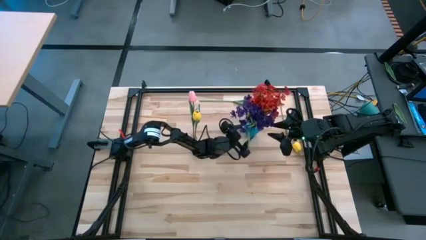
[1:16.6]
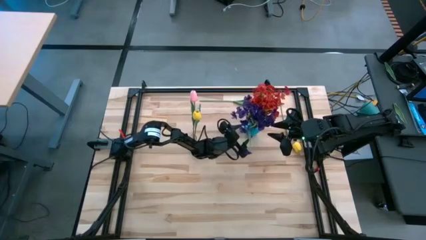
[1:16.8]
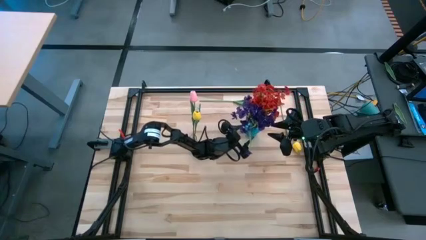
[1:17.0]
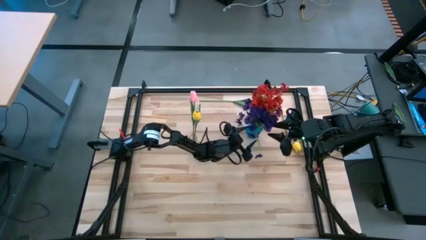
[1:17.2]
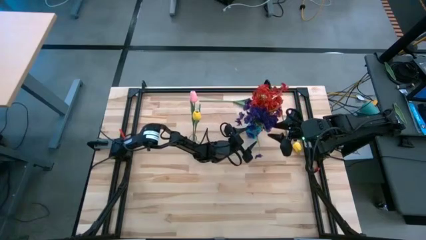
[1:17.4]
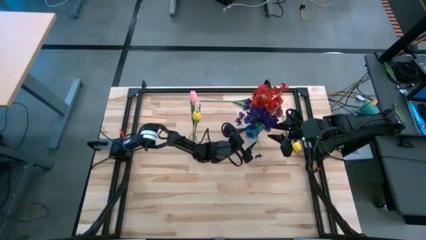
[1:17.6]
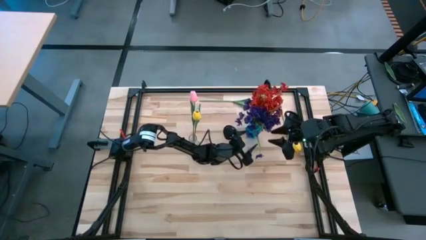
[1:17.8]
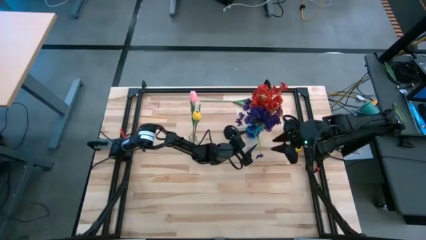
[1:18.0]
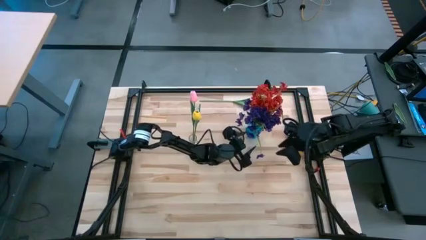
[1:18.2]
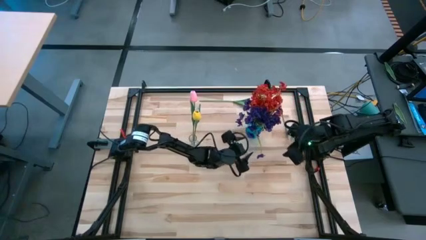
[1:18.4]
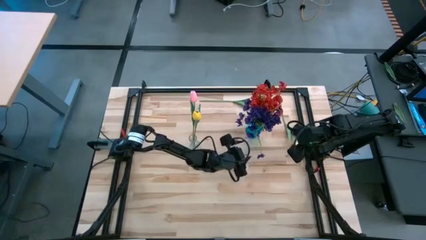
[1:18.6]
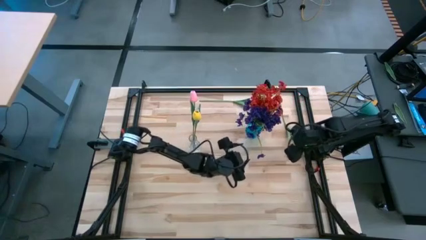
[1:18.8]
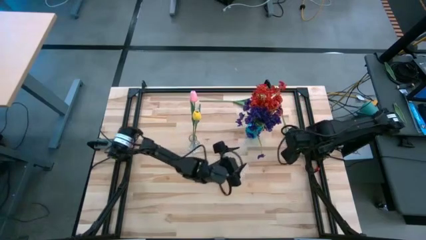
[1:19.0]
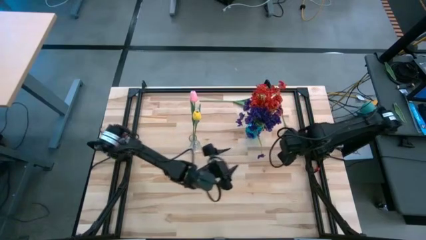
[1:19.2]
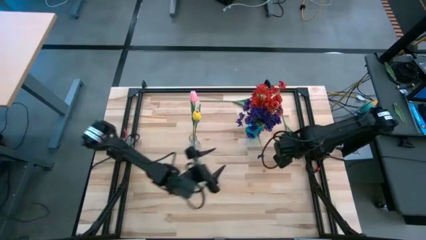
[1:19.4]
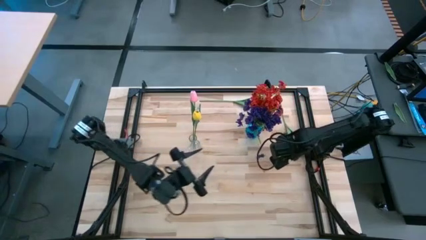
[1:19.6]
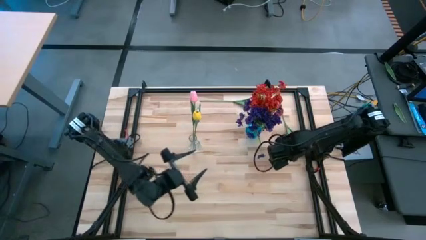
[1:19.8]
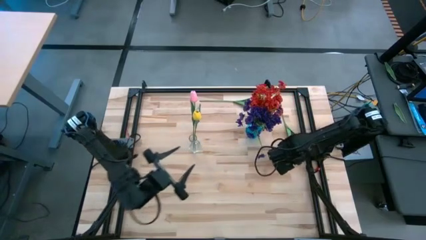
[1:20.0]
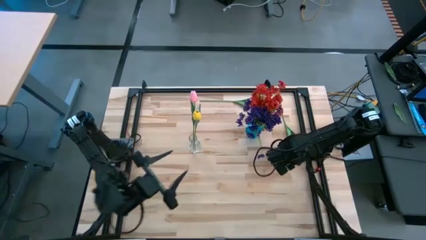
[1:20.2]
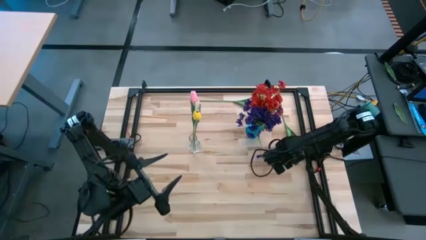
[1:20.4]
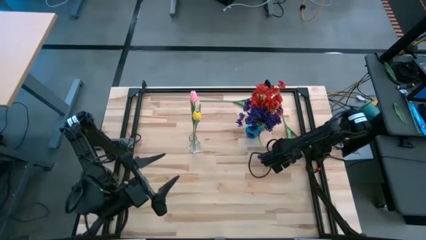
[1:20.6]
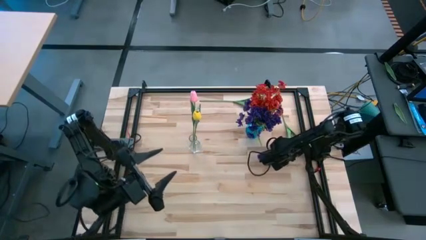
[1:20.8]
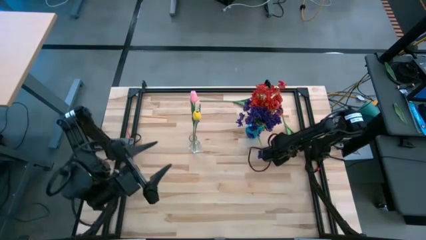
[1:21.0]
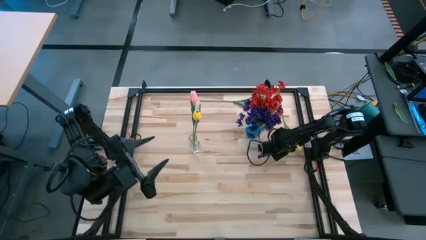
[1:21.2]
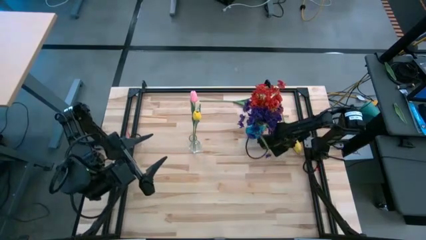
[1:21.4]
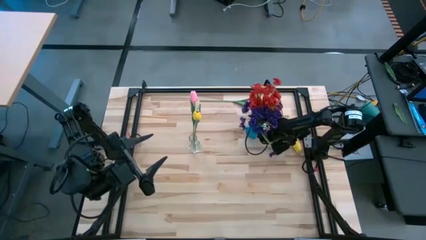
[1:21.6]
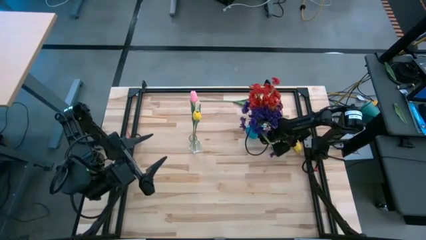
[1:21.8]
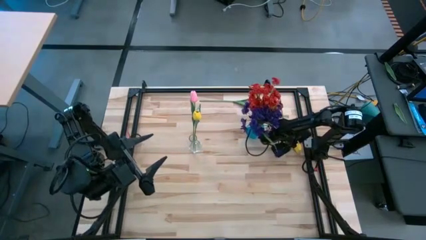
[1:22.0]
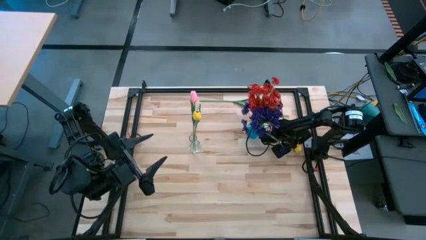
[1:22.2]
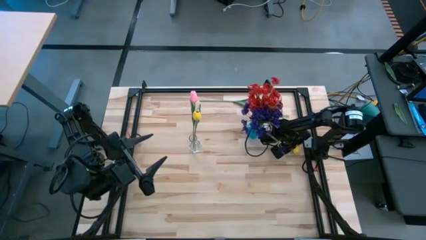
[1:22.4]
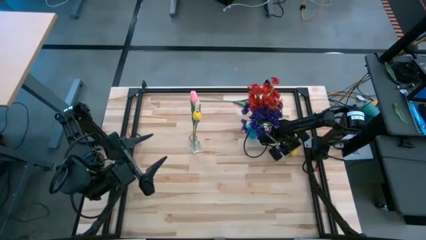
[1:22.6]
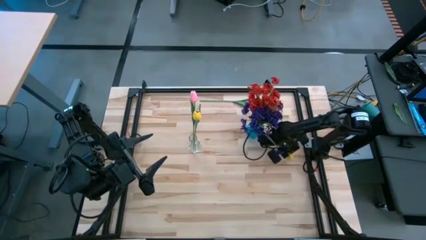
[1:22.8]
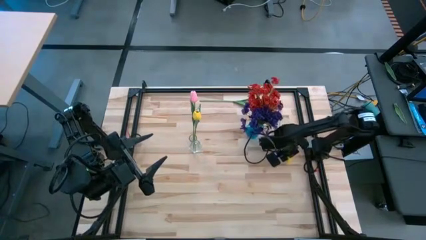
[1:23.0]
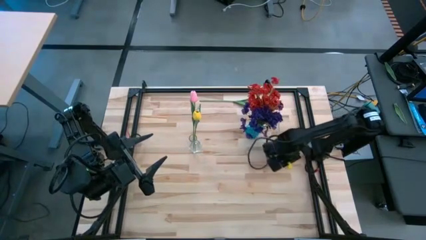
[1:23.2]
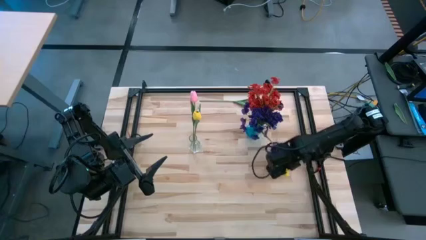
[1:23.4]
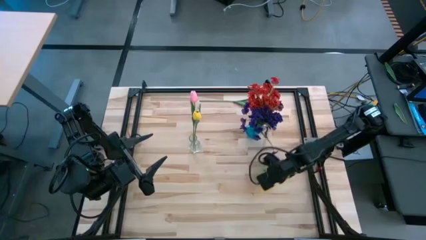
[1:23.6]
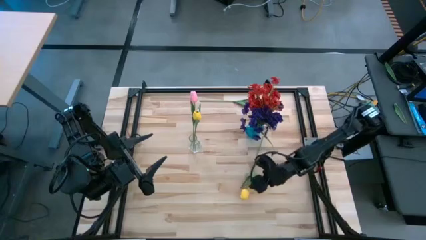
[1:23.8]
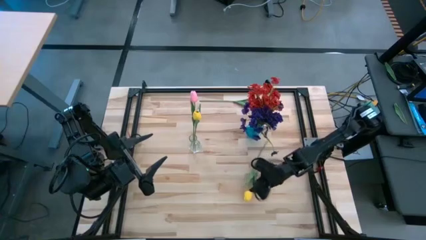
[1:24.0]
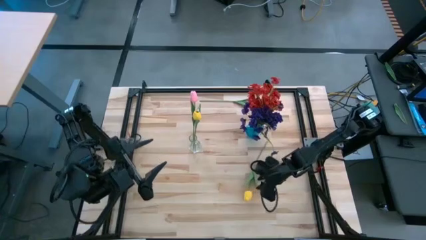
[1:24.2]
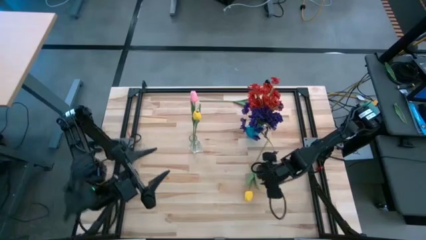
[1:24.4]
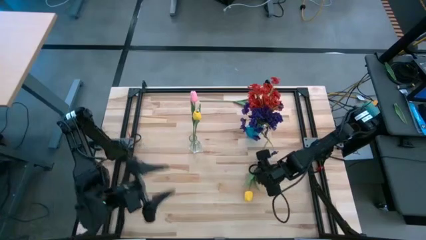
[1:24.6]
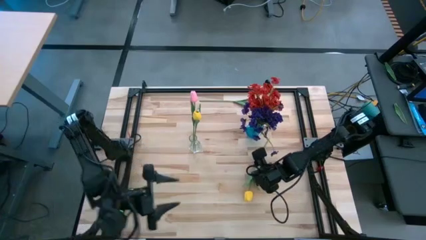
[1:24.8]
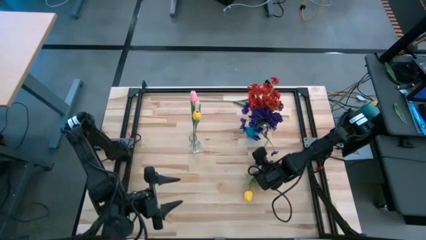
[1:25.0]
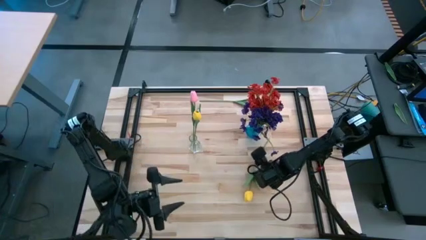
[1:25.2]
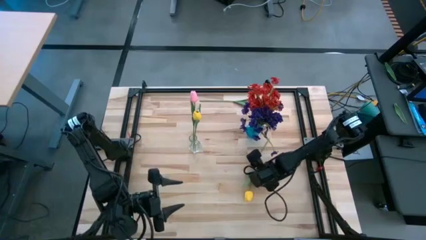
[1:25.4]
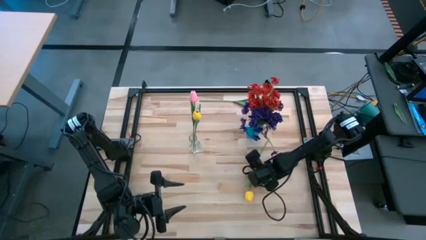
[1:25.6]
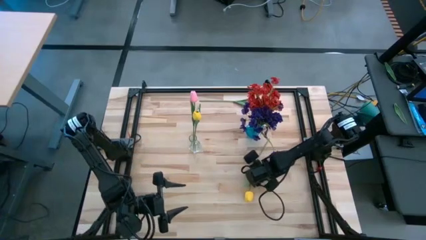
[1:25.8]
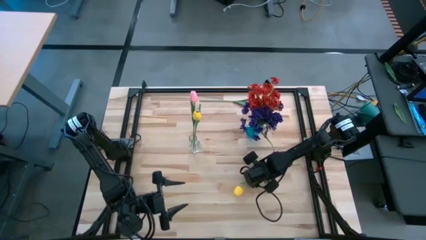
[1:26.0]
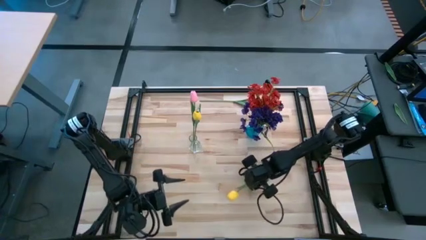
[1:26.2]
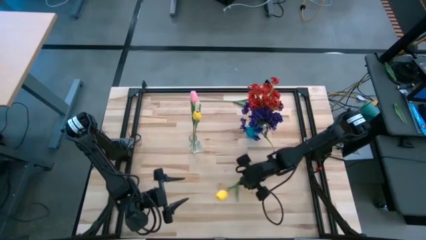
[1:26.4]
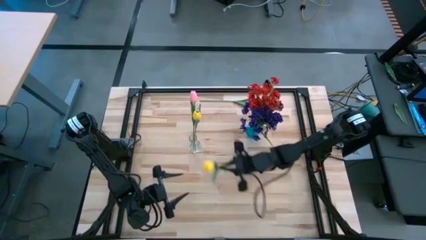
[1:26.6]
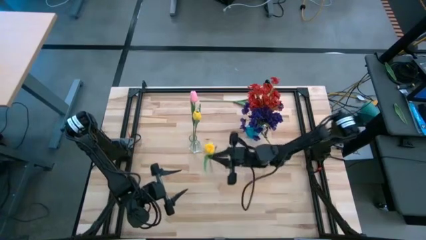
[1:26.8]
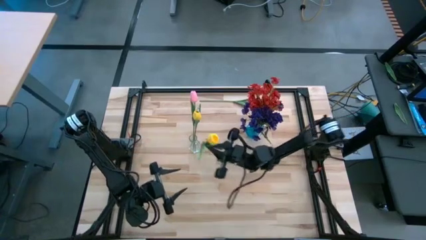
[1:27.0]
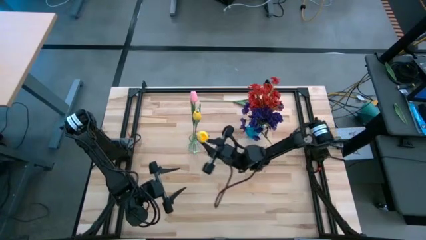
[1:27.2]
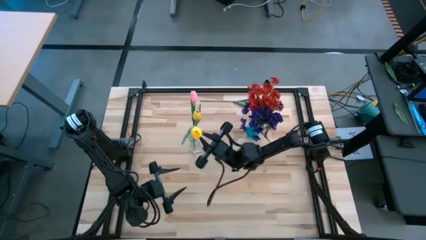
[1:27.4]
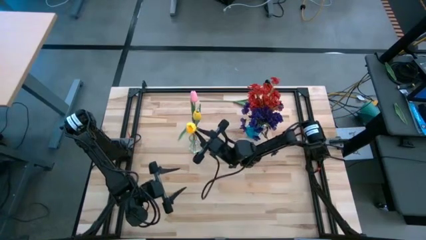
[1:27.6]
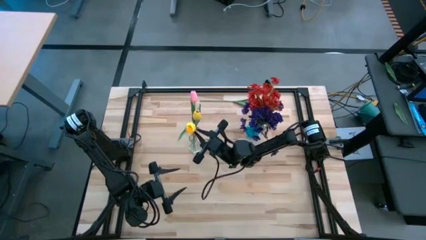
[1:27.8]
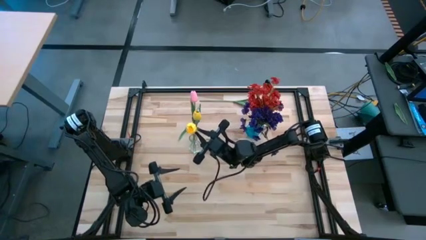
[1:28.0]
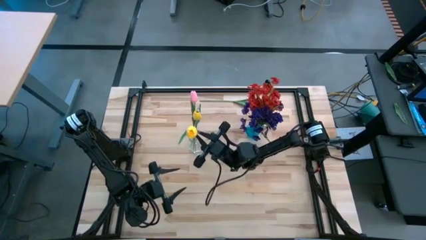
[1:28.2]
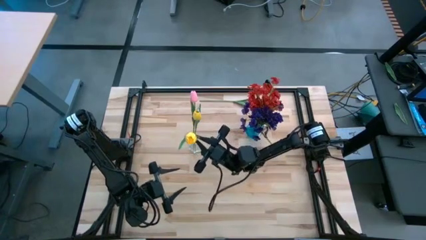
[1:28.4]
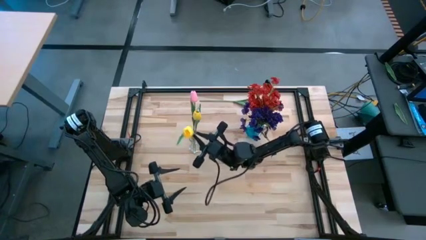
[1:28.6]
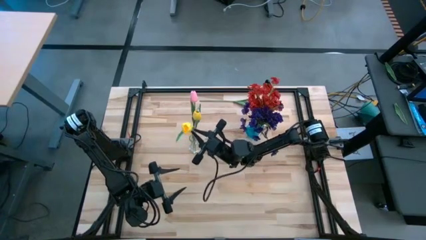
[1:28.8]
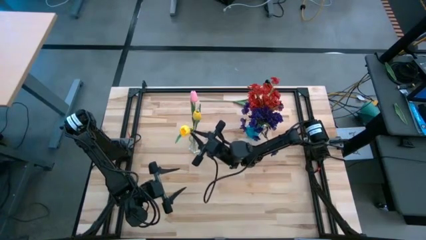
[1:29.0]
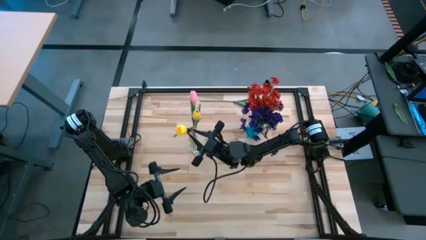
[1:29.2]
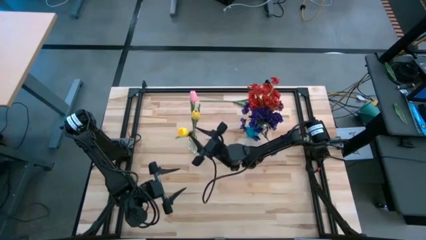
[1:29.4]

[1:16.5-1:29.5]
Task: Sort flowers into vase by color
Put the yellow tulip into the transparent vase

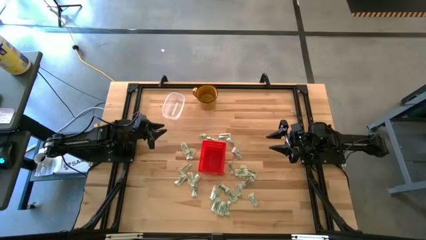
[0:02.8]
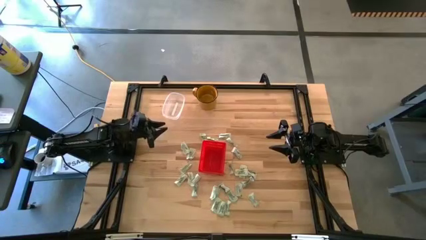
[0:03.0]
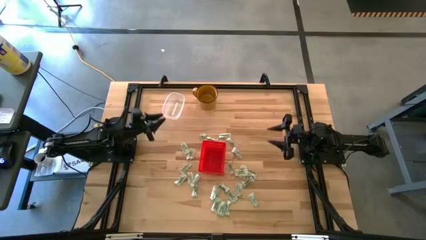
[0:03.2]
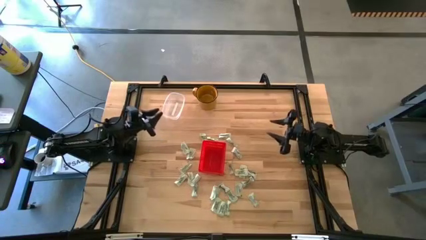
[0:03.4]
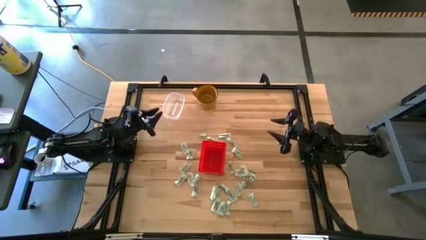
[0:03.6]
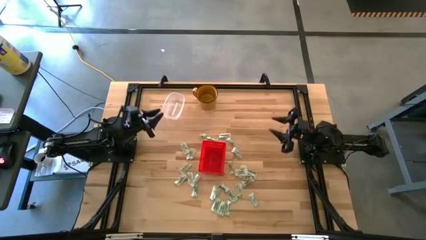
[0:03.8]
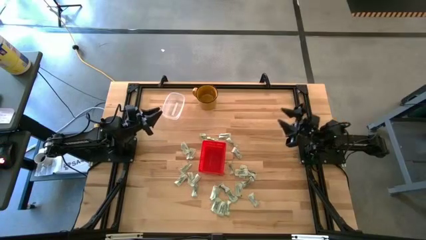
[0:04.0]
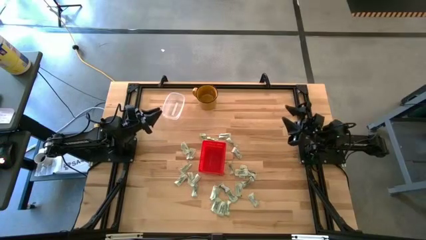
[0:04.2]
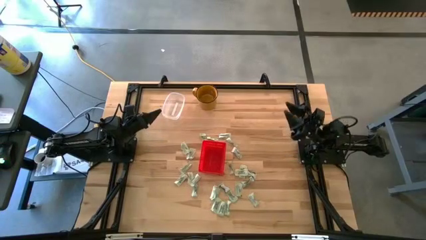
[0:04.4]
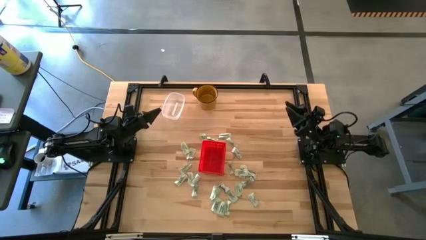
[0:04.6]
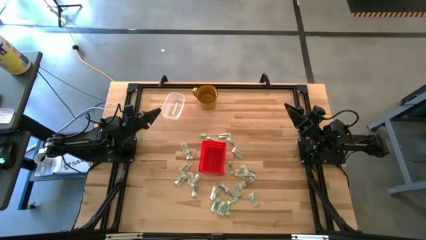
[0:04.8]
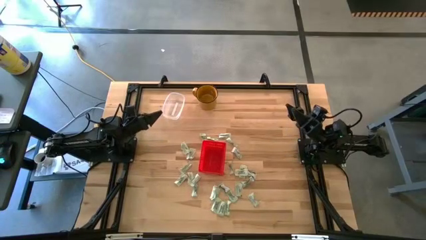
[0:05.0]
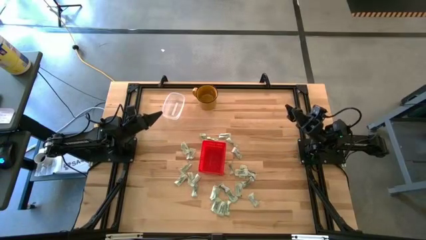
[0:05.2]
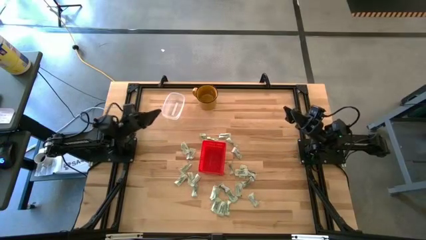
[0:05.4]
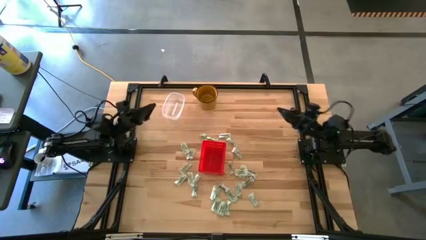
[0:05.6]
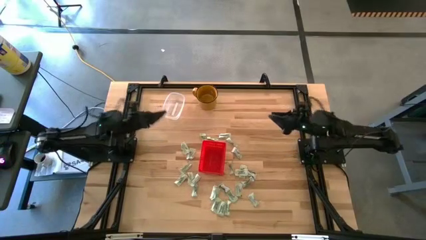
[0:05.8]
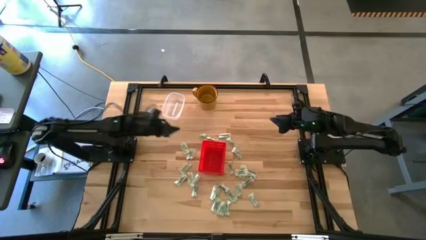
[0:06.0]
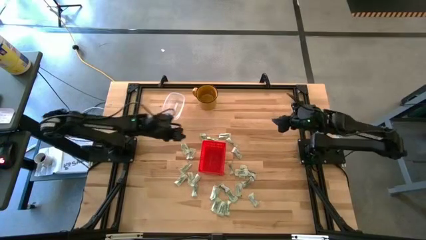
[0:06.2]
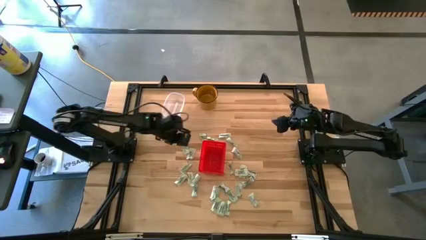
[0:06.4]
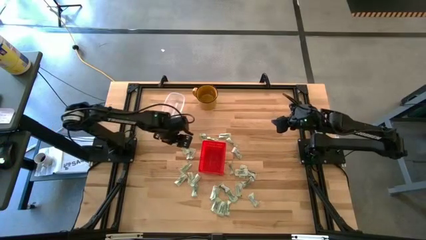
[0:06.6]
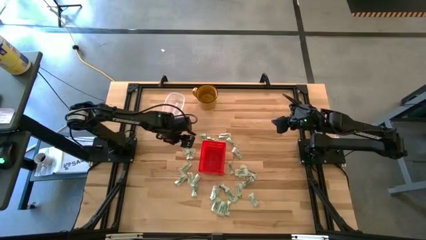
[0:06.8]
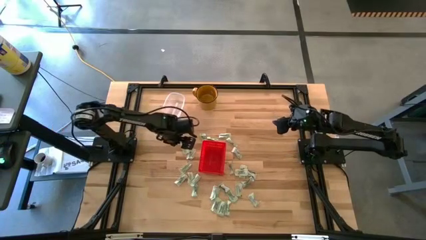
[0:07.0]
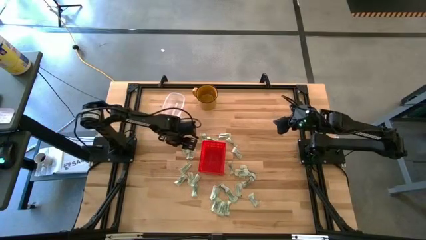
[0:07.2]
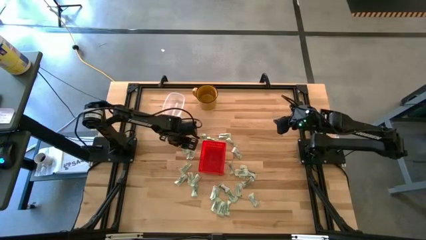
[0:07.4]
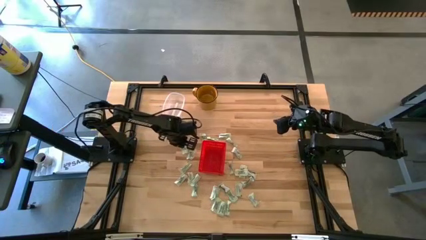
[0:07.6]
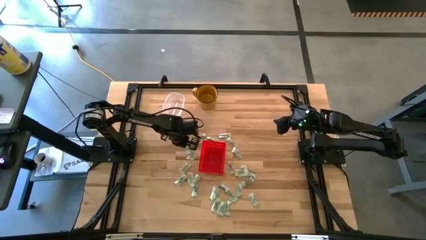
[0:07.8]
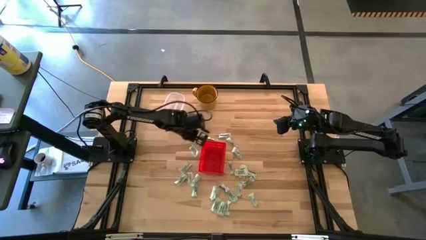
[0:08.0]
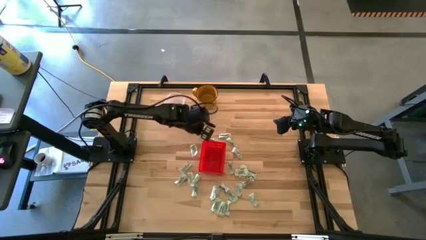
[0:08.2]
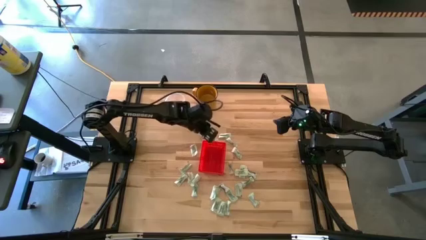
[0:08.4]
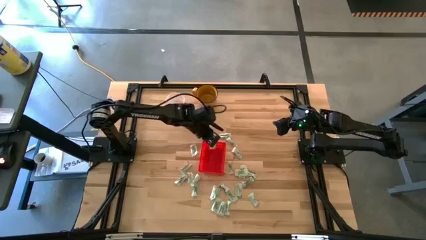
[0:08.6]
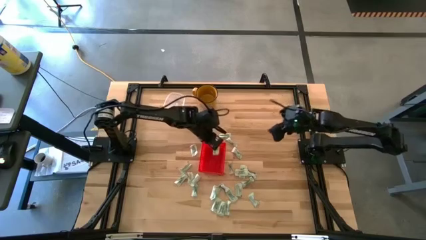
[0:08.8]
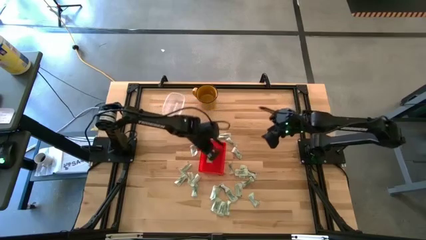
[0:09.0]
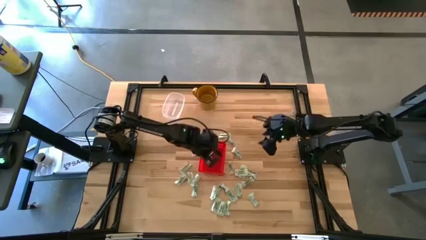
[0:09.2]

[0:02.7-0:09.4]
Task: Pick and place Stevia / Truvia into bins
Put the white stevia packet into the red basket
